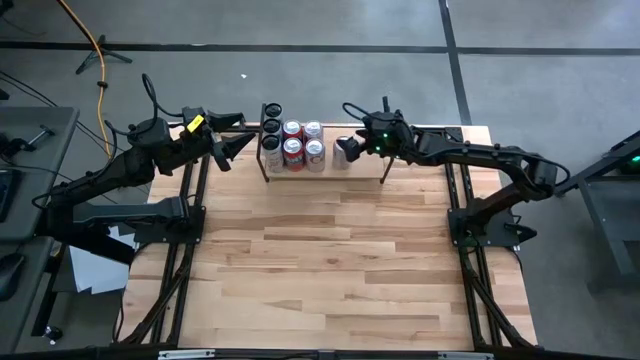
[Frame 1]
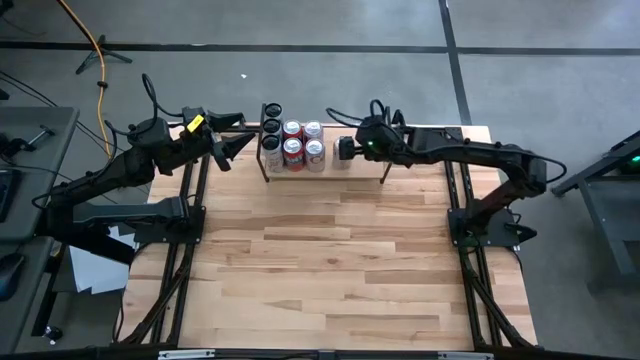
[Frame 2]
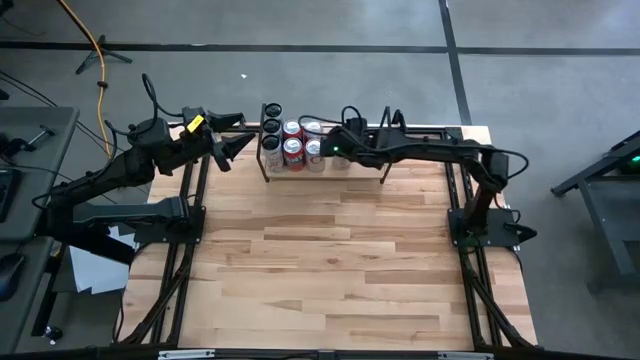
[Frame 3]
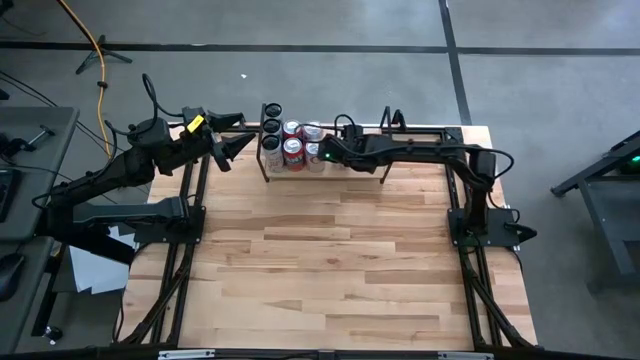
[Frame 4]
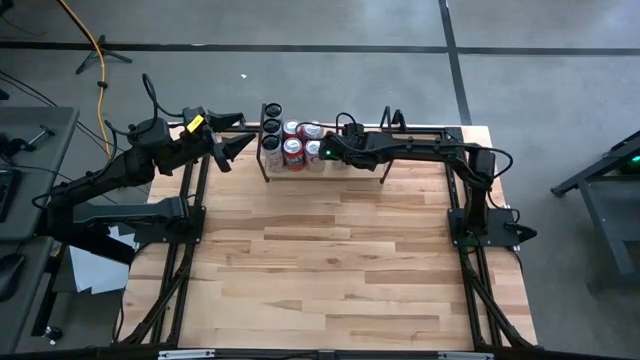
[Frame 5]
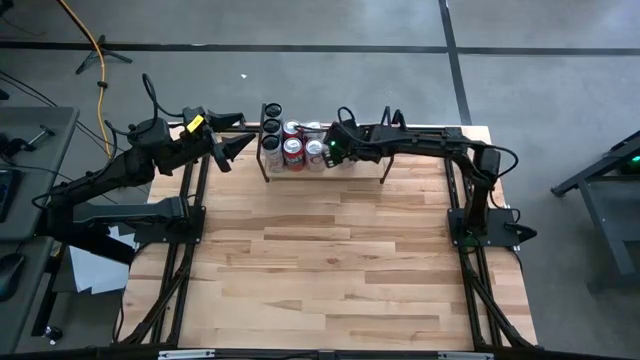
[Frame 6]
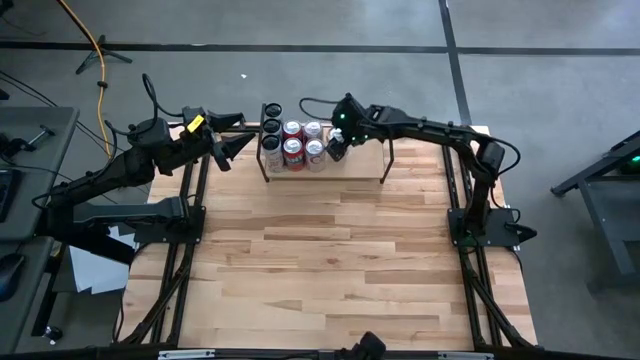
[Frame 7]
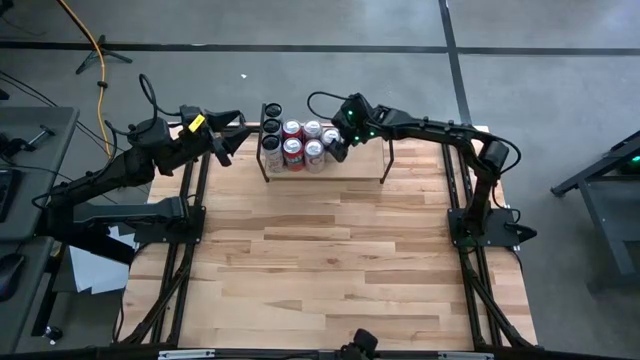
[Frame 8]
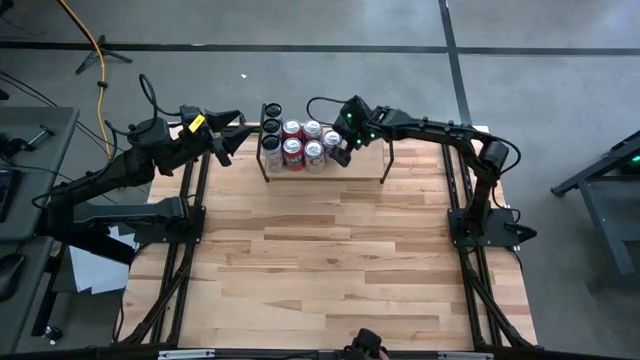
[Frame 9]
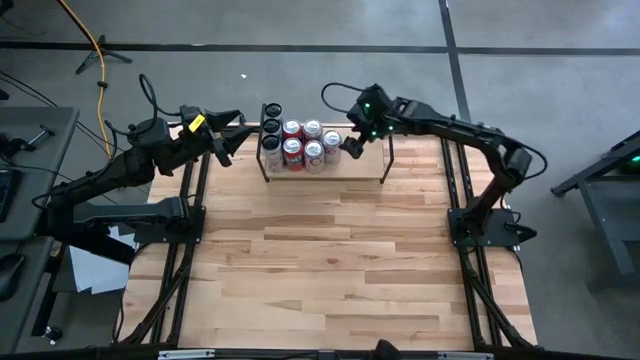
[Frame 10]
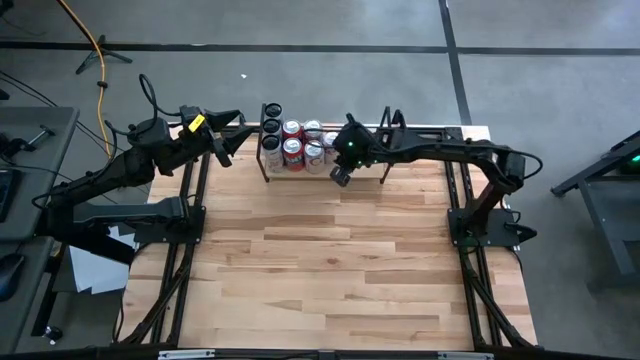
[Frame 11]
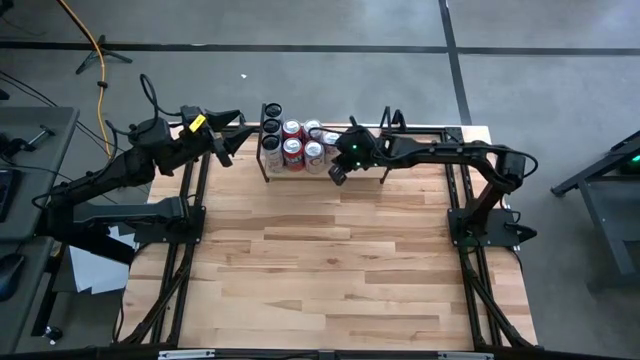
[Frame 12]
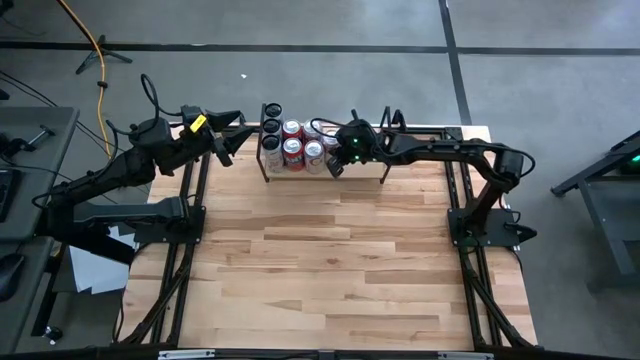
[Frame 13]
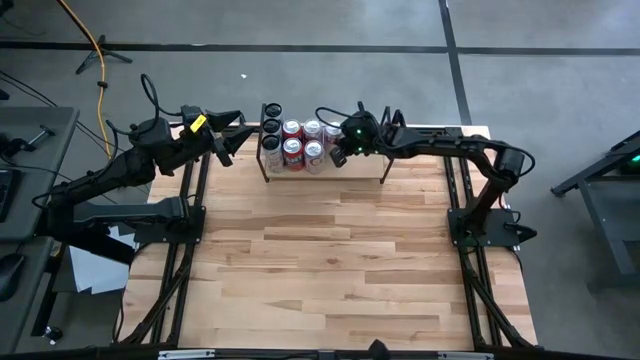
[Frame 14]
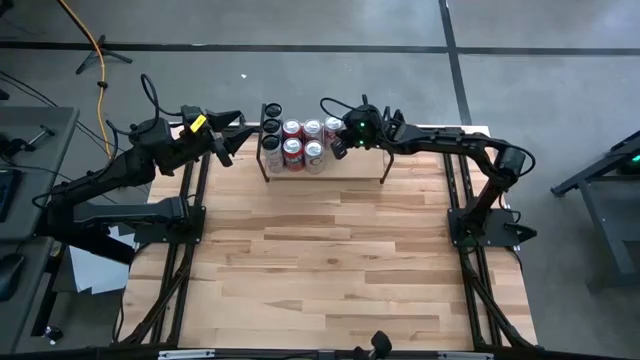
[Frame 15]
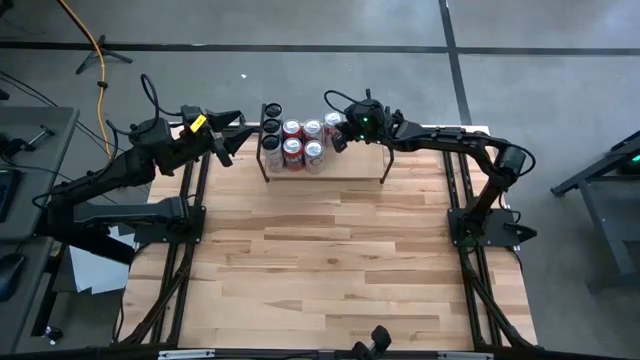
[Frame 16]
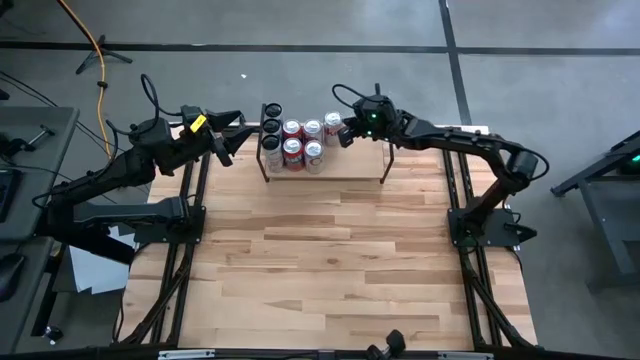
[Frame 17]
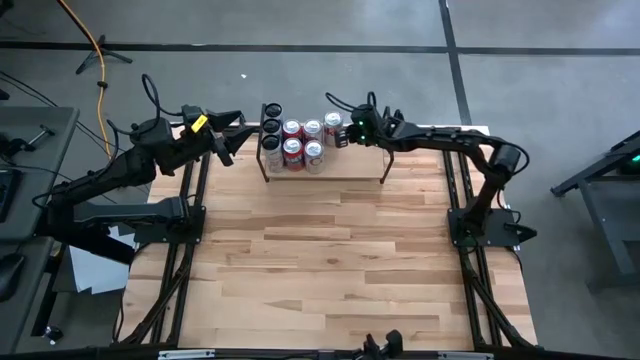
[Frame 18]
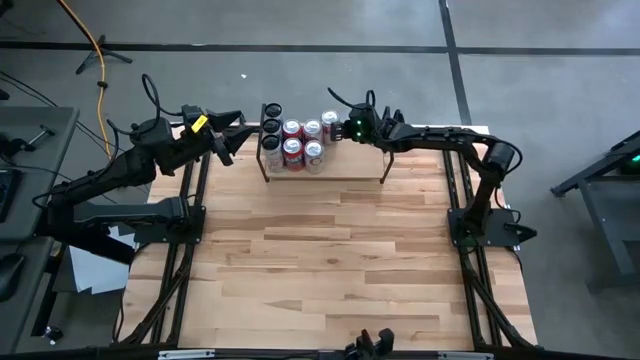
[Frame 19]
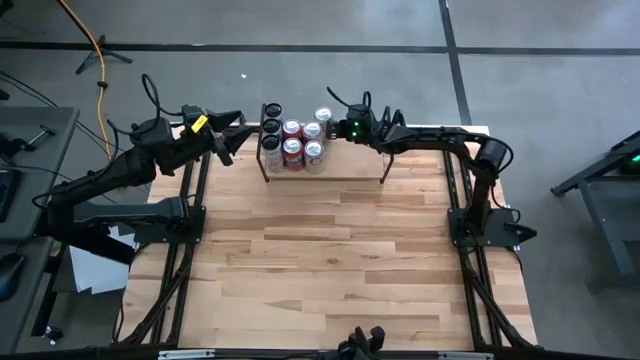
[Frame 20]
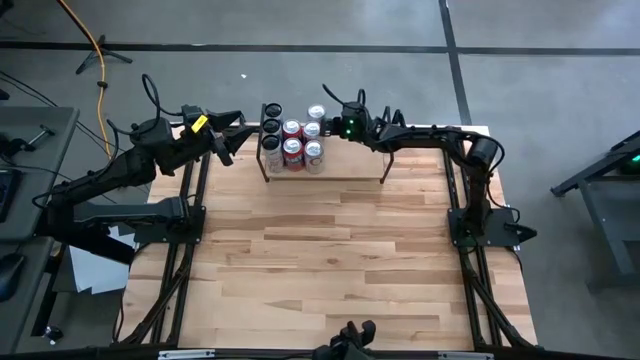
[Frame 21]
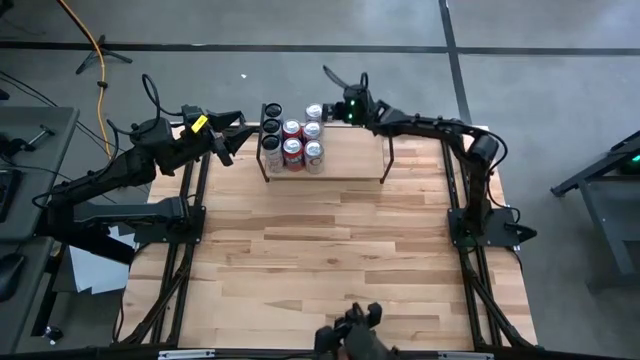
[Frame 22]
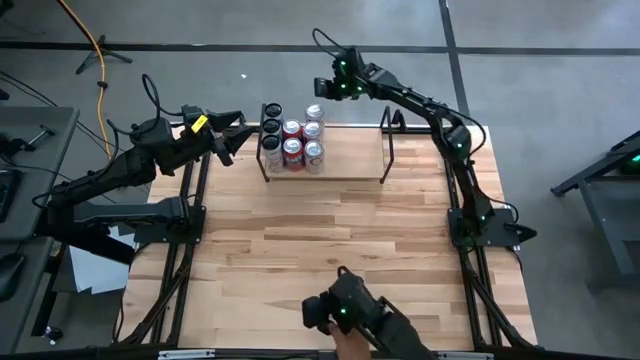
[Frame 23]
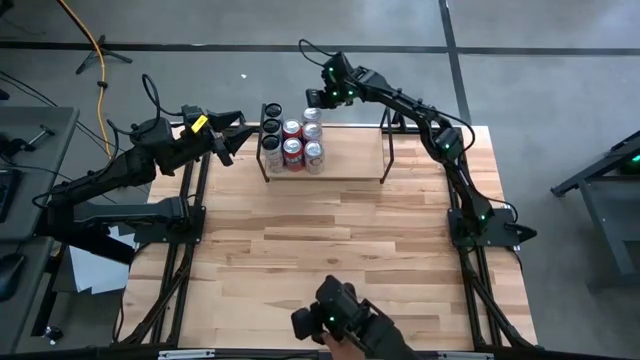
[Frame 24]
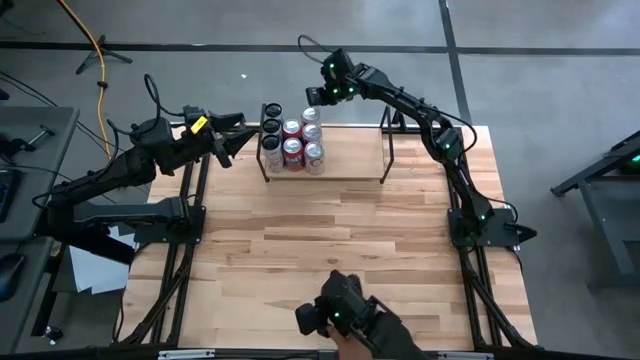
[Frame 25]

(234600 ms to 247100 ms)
Task: Place canned beverage on shelf
Put the silver soda can aligned with the other silver soda can on the shelf

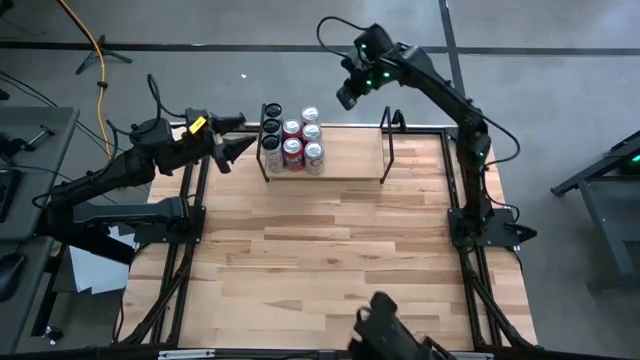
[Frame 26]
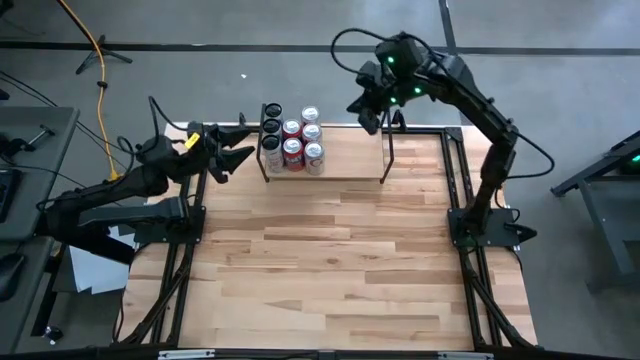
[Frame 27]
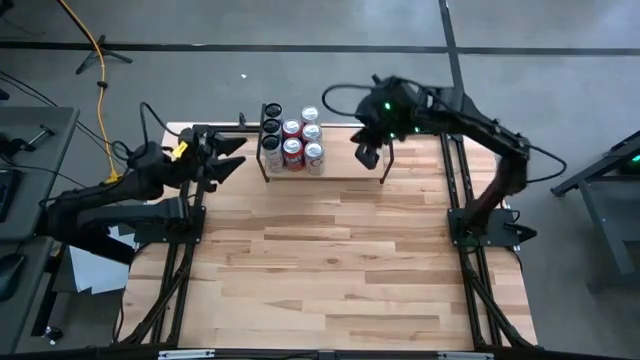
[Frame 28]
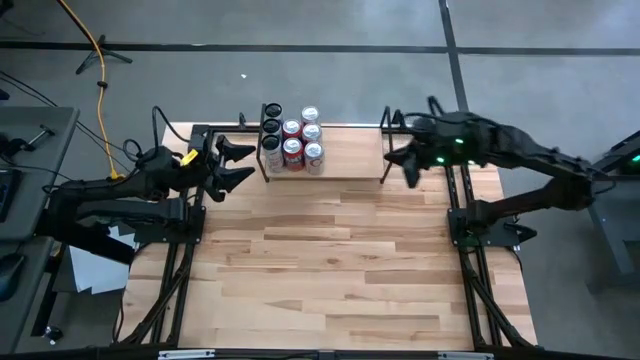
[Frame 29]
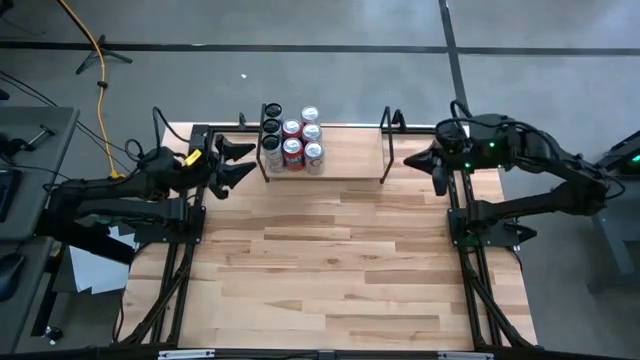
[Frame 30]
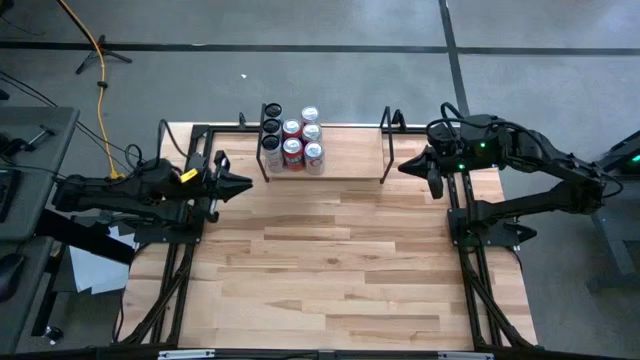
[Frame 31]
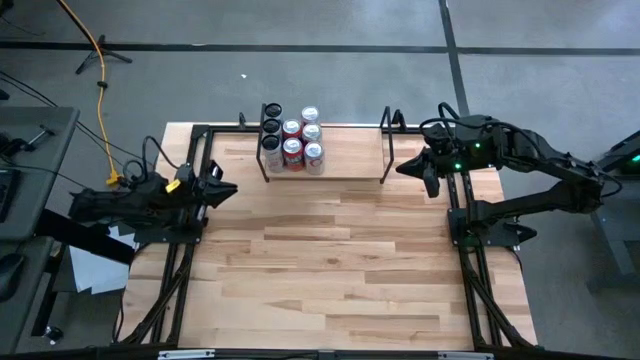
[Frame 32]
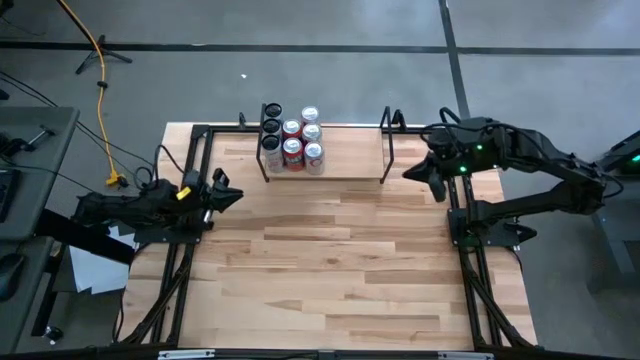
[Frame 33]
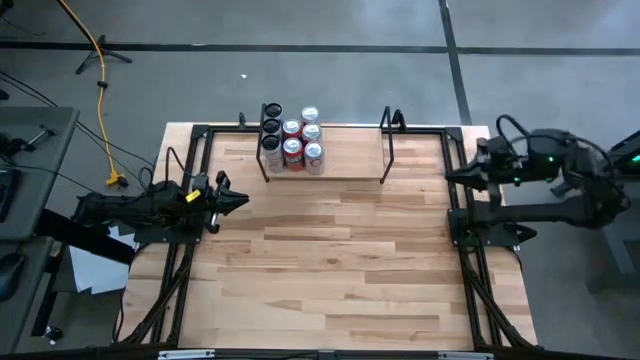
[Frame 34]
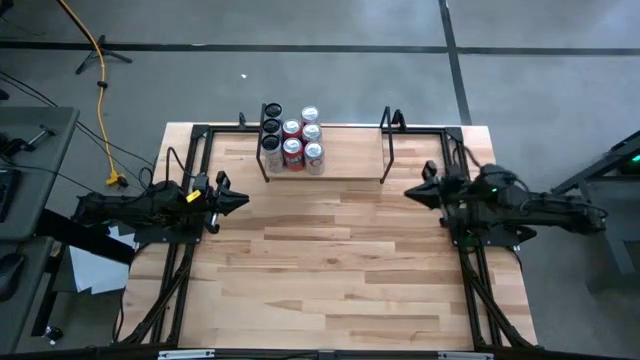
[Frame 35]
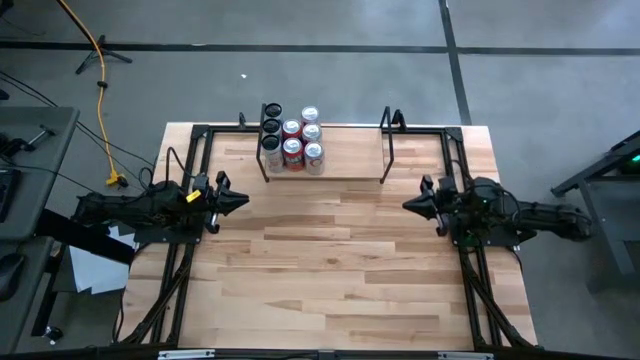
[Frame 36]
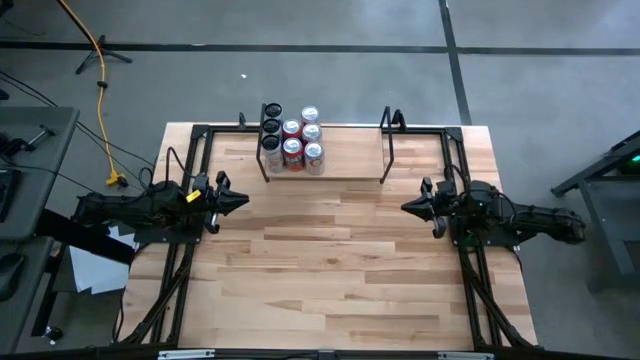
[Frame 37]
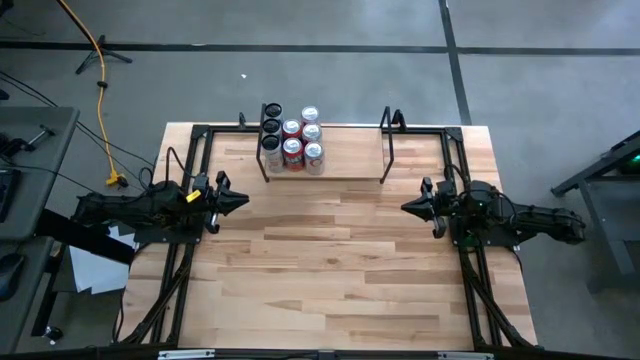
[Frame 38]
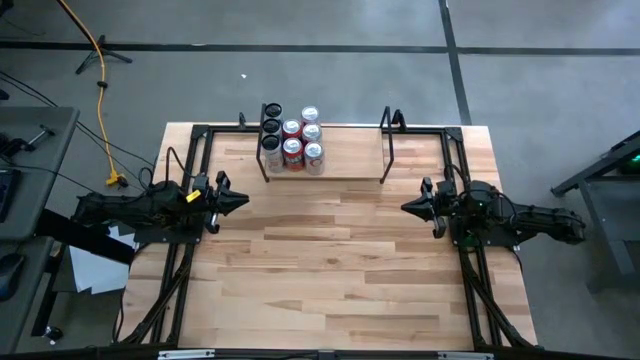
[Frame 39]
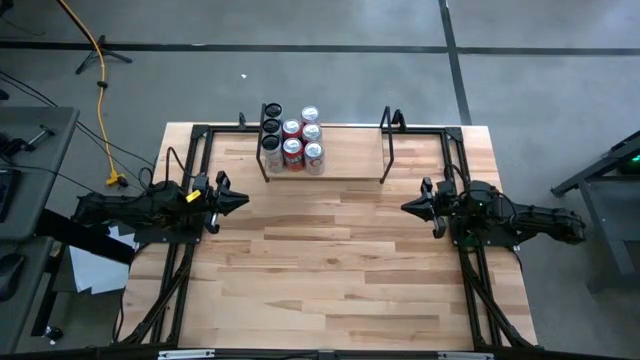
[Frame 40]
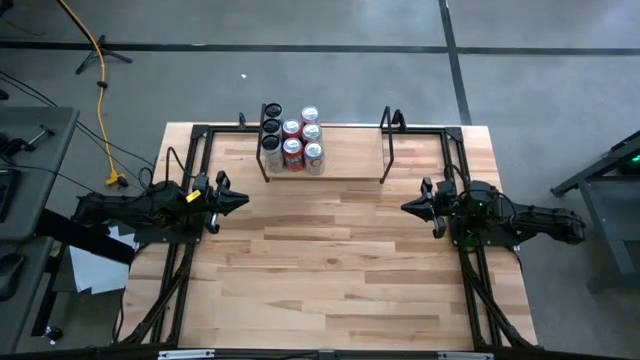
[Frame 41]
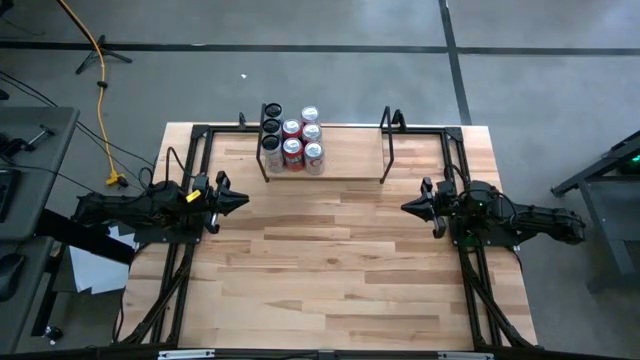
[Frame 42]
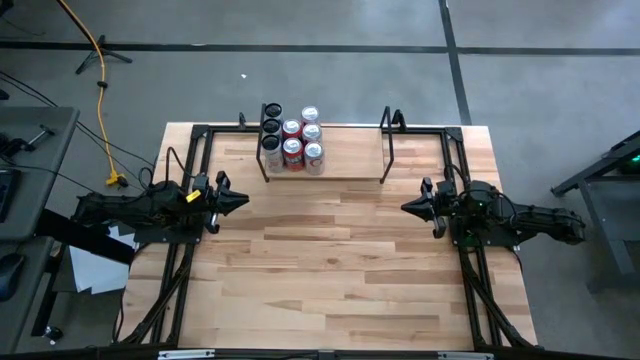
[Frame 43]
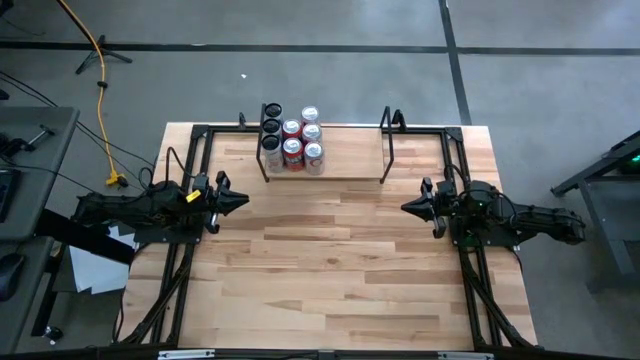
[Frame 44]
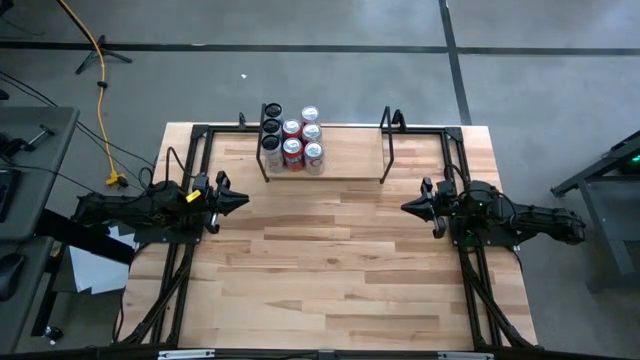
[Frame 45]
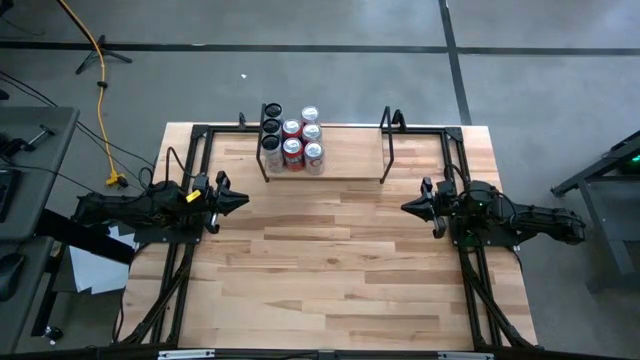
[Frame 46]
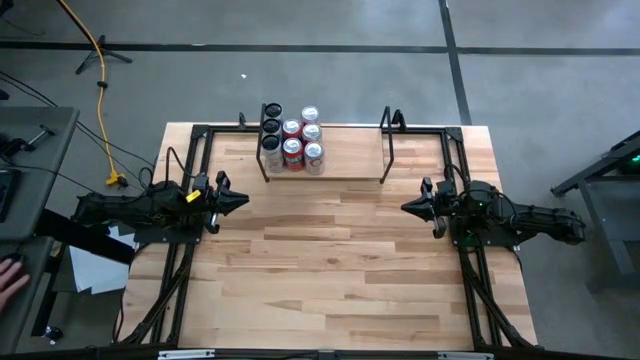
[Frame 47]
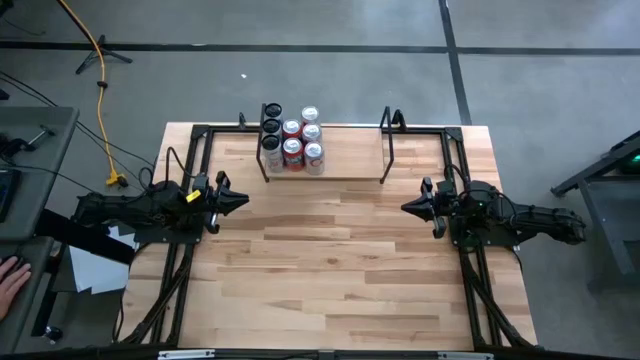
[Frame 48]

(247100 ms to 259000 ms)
Return to Home Position
